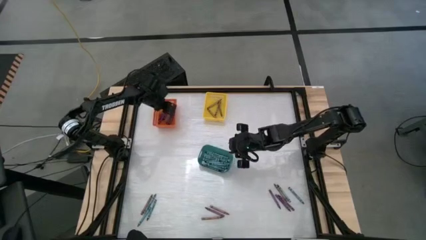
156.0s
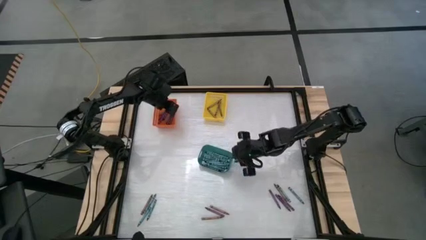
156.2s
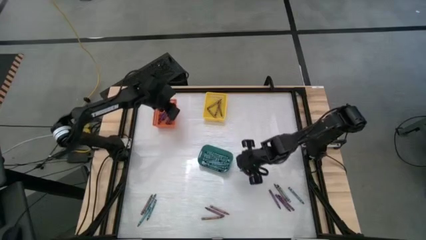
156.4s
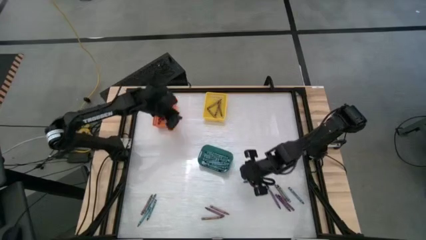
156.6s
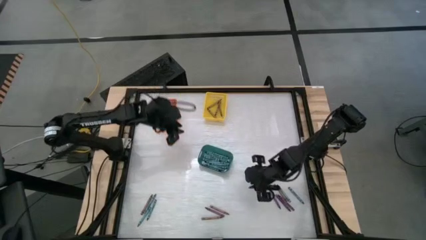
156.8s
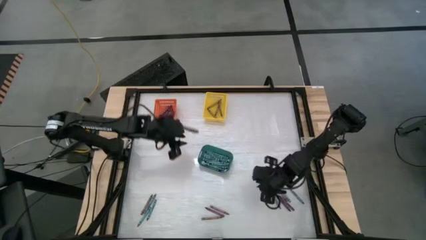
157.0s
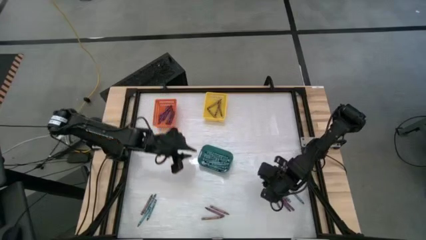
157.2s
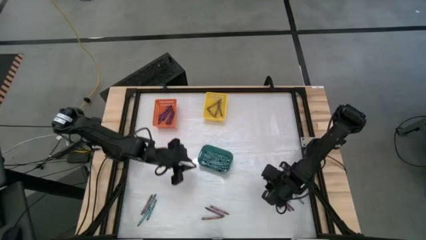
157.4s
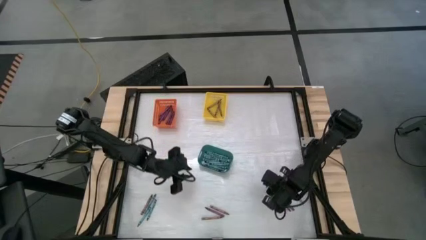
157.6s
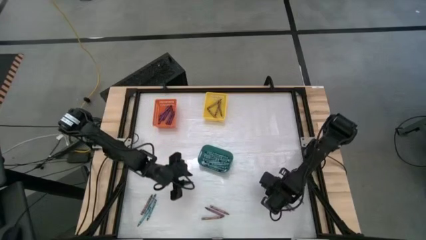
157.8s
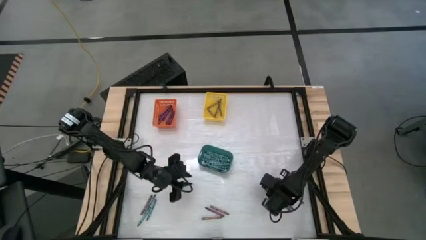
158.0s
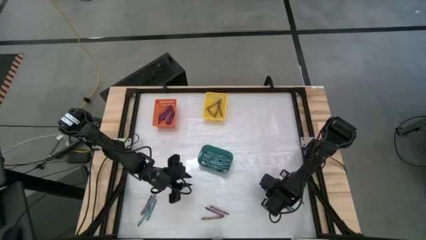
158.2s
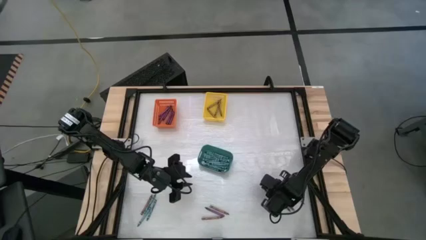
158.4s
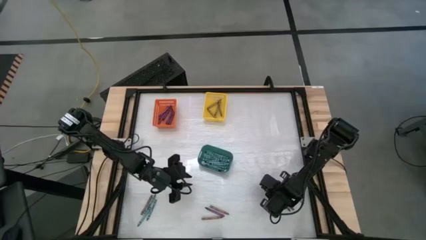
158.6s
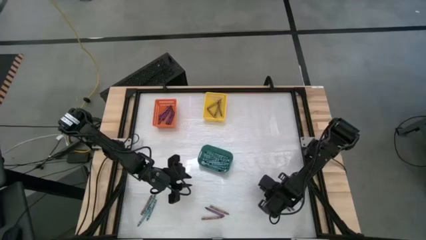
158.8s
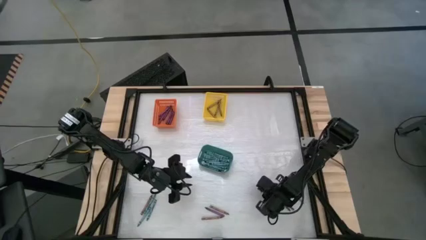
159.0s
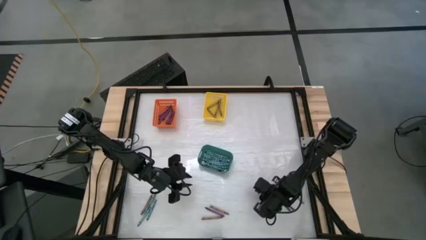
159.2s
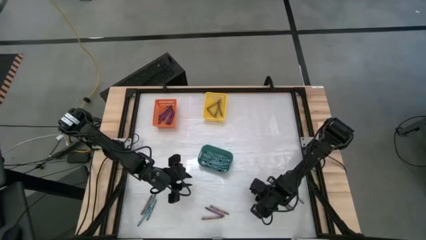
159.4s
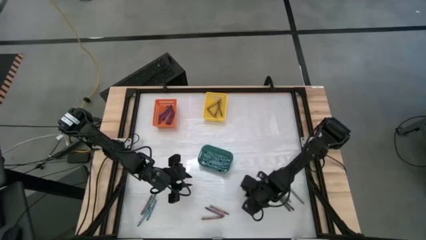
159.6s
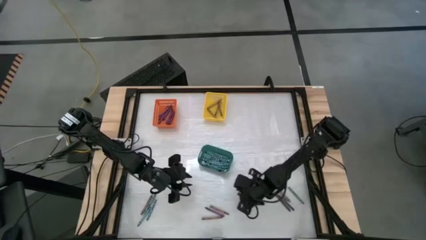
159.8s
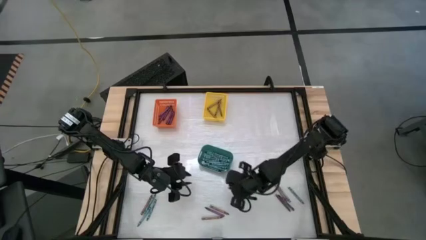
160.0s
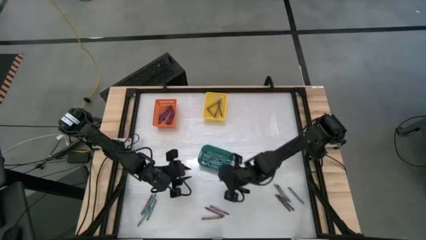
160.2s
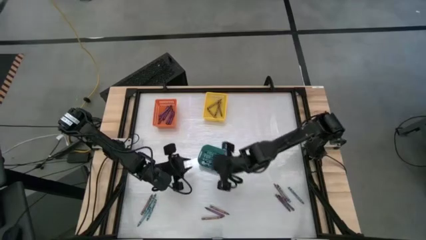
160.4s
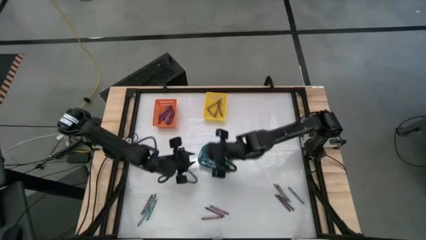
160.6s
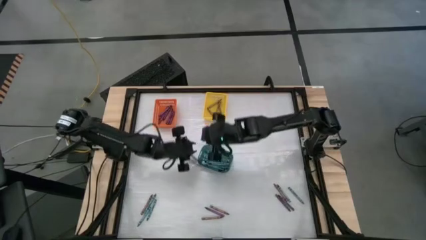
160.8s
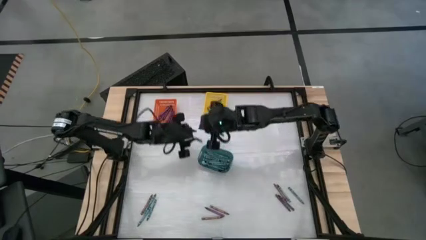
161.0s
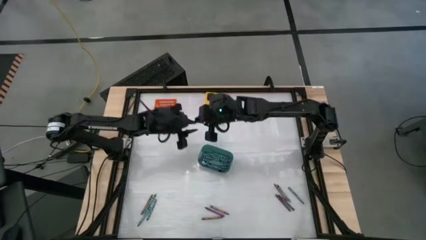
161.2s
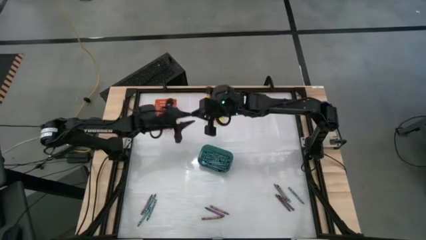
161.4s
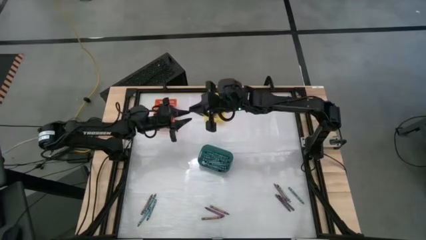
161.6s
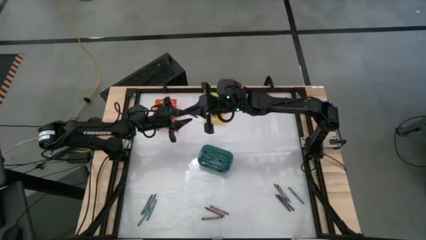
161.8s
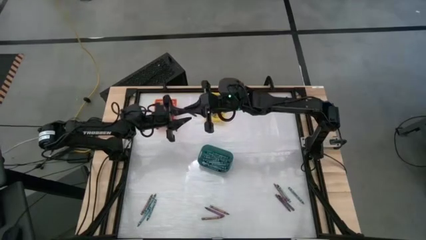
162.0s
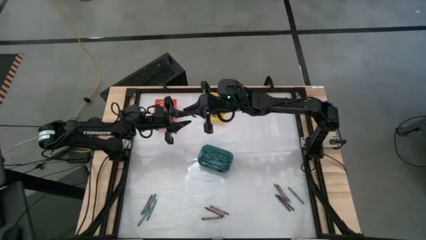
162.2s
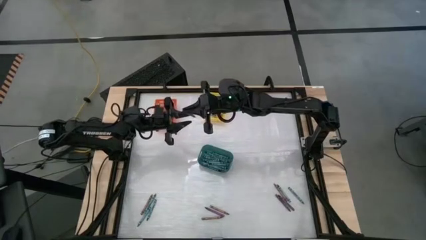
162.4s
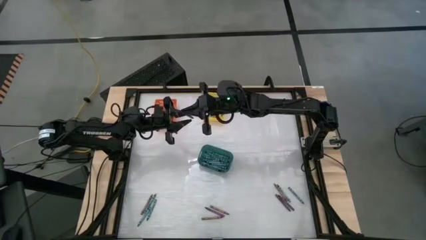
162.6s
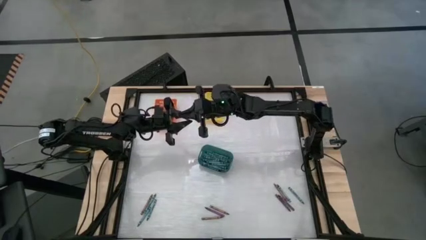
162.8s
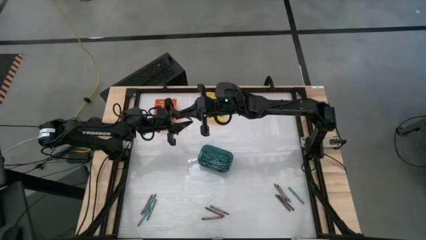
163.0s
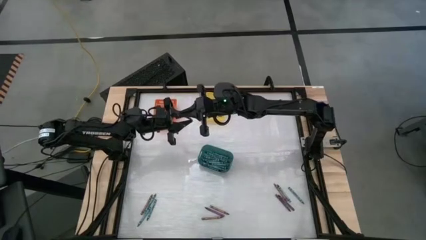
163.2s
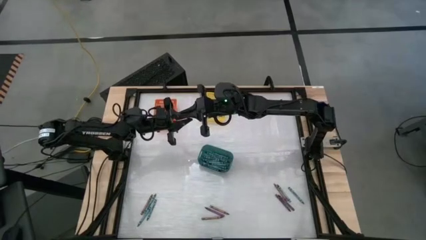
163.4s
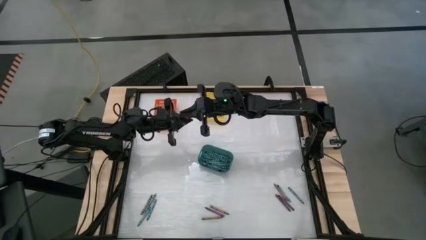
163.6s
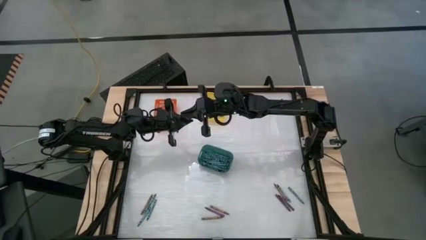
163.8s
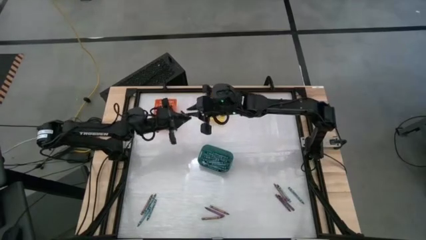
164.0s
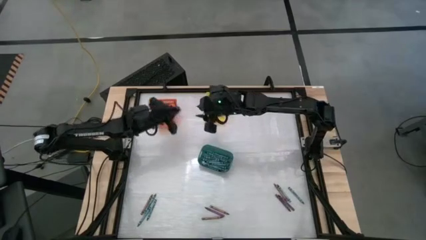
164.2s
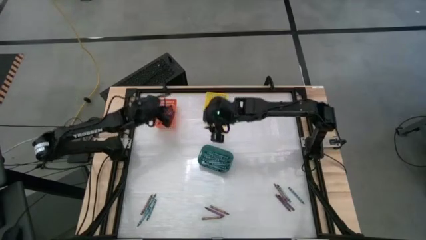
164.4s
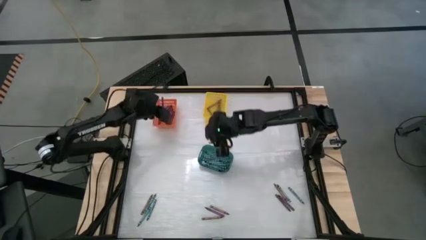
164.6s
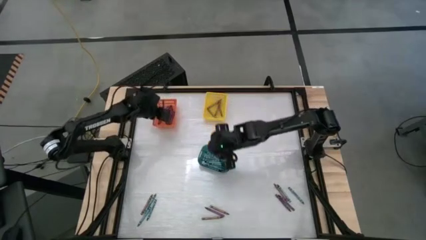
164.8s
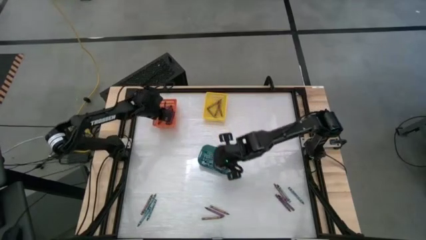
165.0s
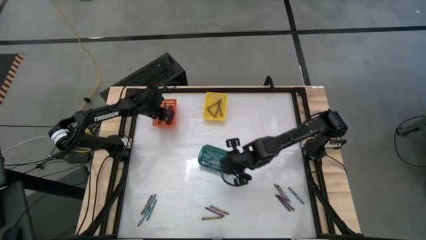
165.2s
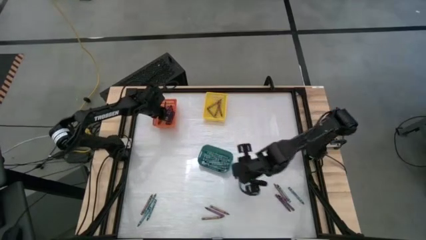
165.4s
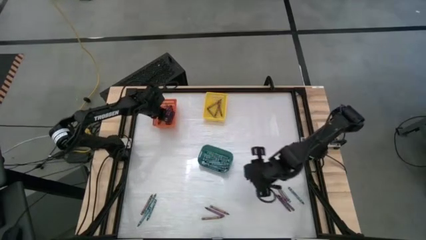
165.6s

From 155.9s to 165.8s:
Task: Sort crayons
Put the violet crayon into the orange bin

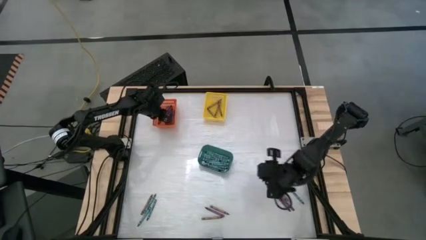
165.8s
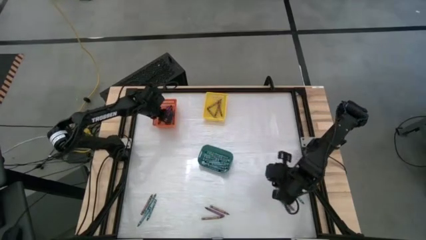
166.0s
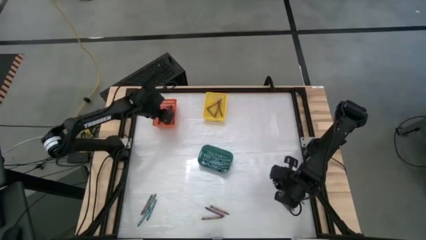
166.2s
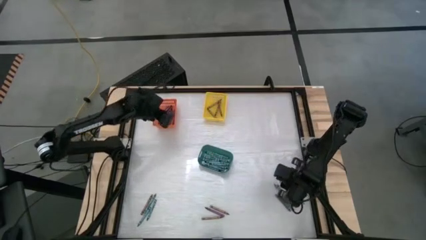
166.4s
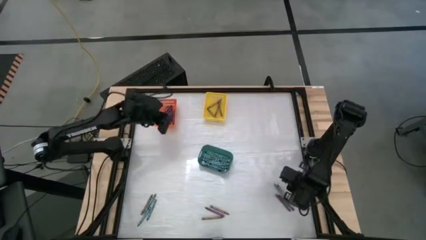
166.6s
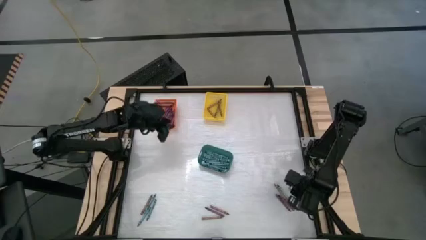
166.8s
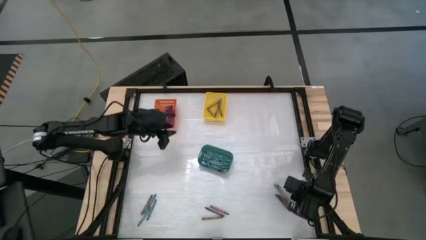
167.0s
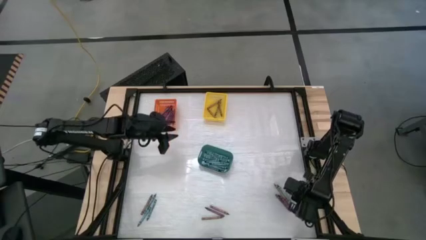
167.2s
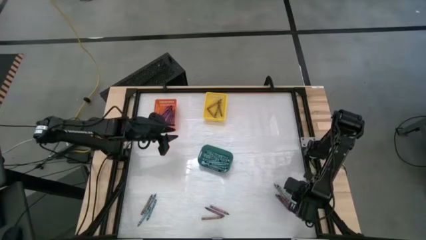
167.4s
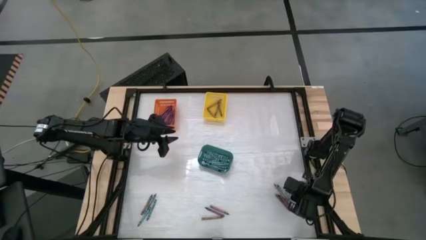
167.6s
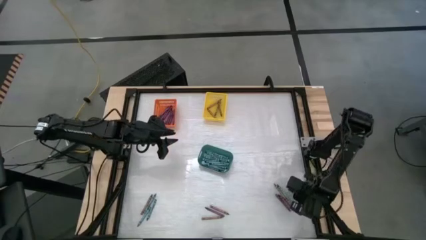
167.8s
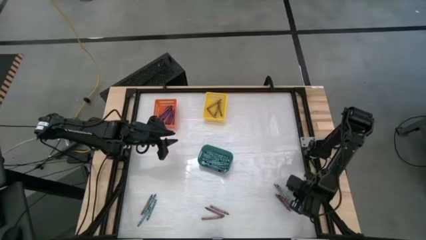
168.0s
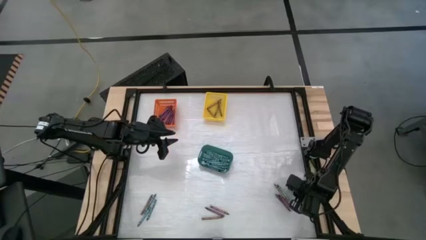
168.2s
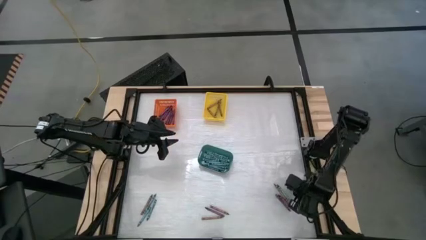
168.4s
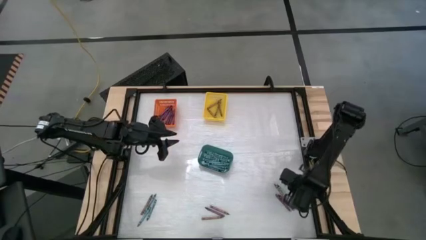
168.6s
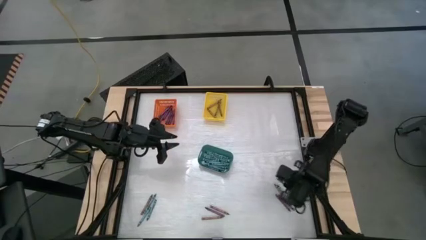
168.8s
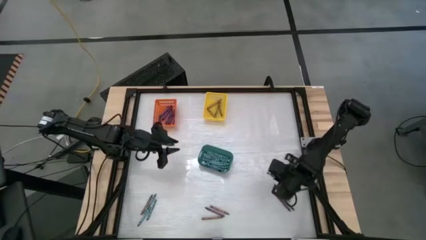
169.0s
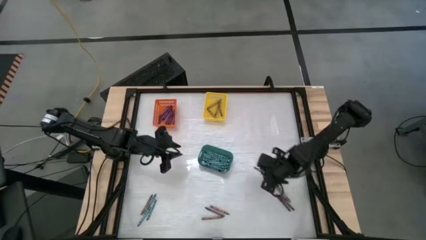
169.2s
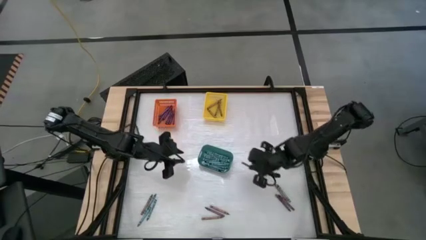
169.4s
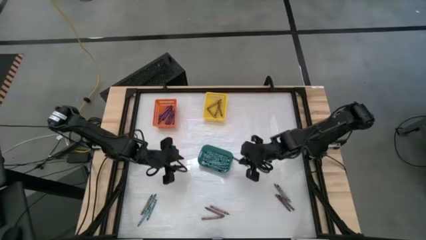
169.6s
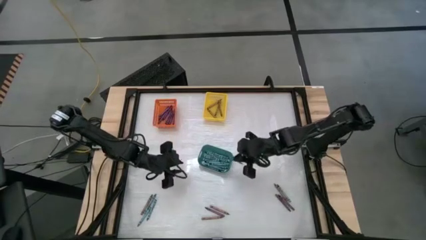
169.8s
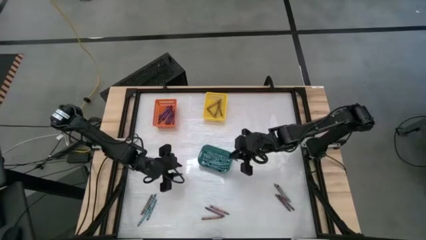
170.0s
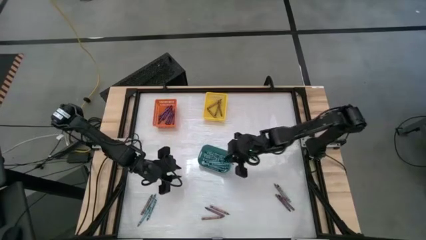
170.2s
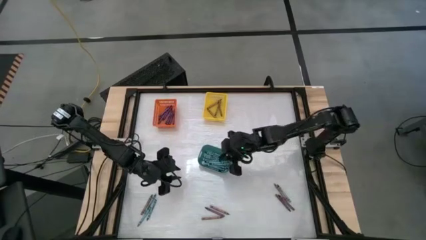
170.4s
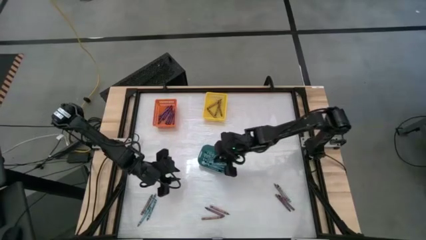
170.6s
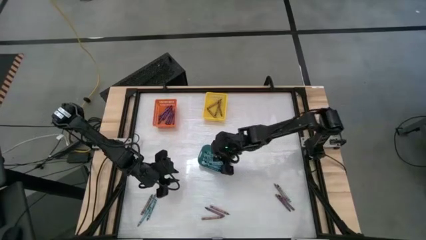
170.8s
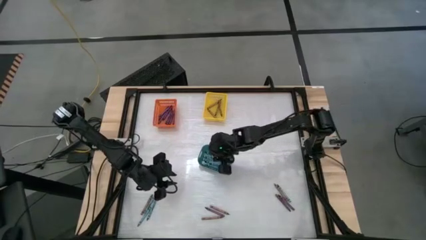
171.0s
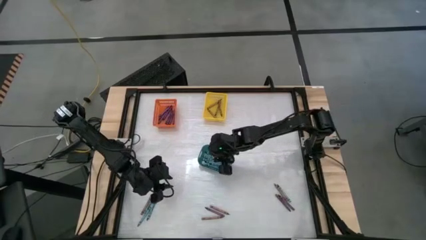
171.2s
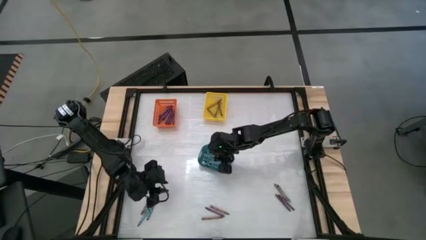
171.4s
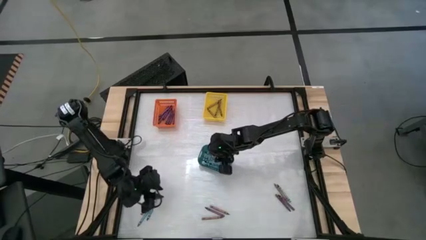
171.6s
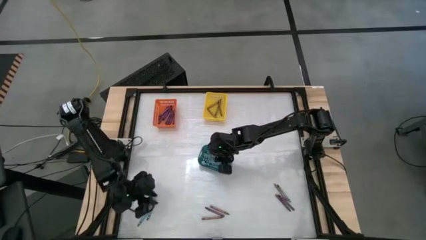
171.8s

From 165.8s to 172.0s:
Put the blue crayon into the blue bin
